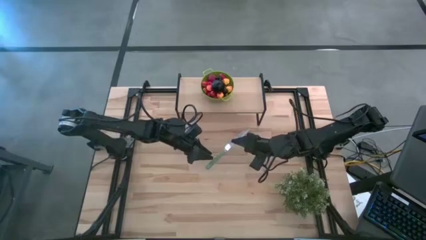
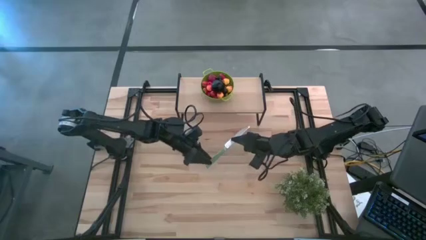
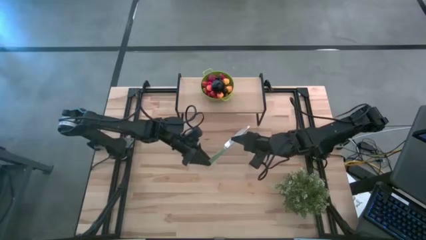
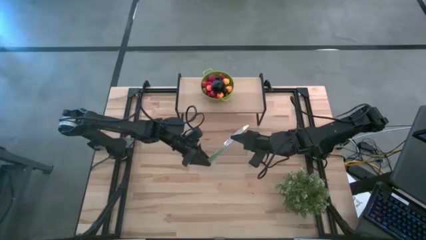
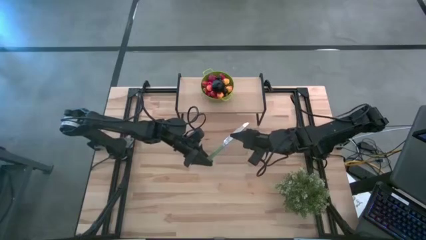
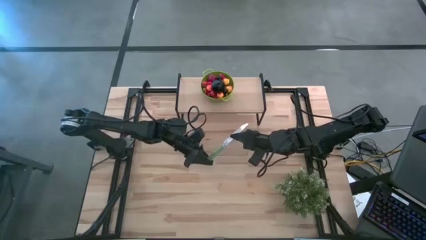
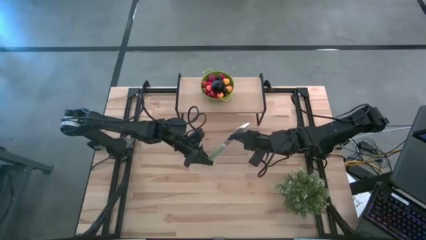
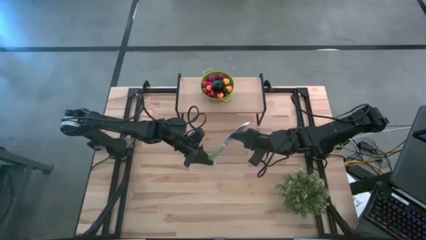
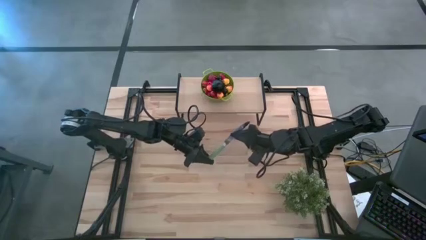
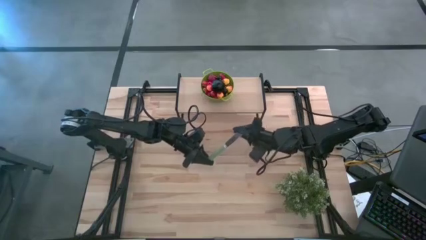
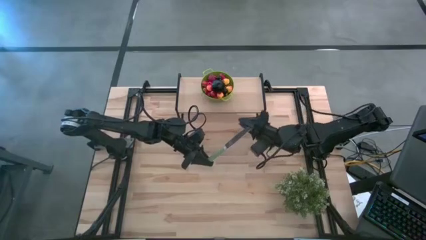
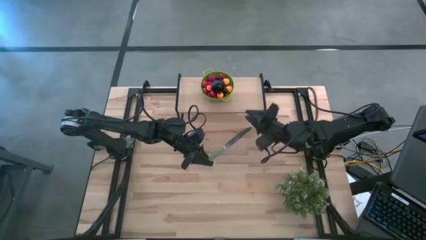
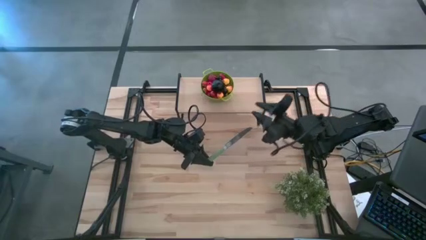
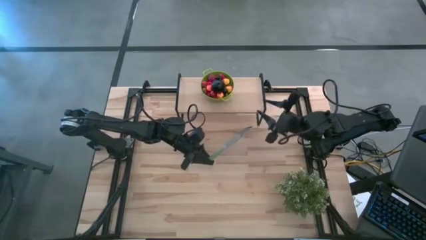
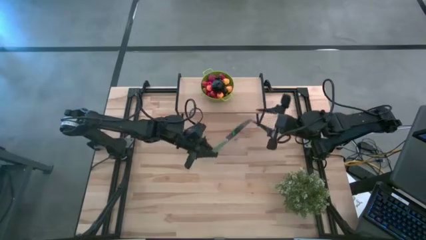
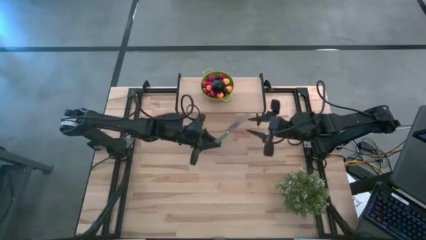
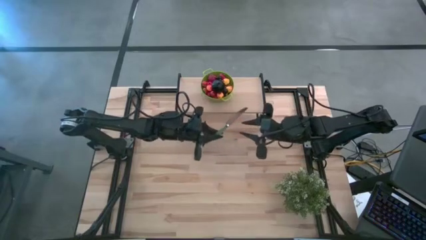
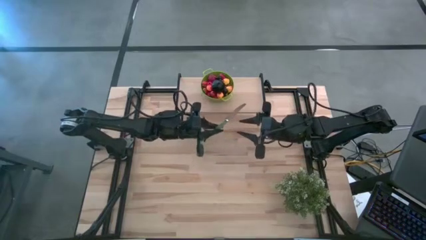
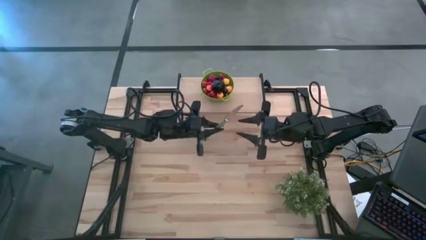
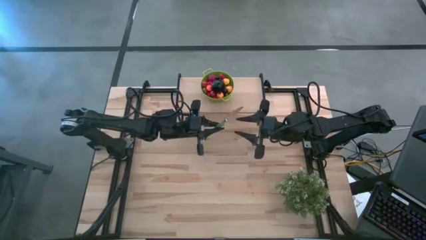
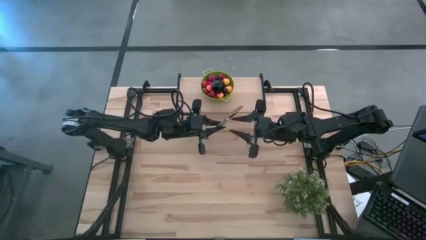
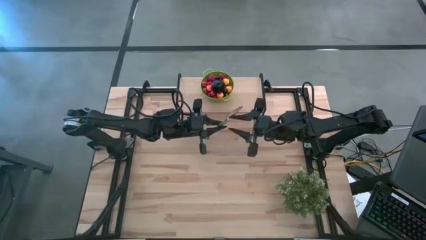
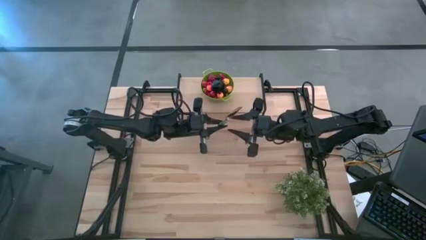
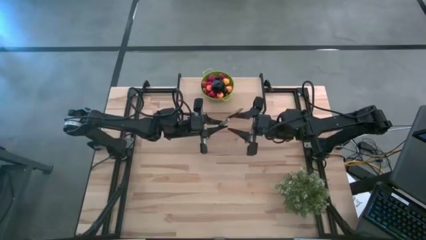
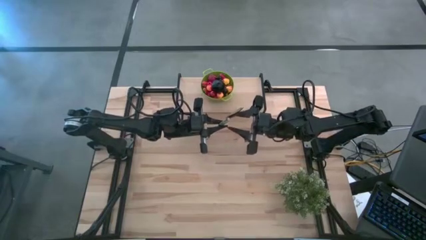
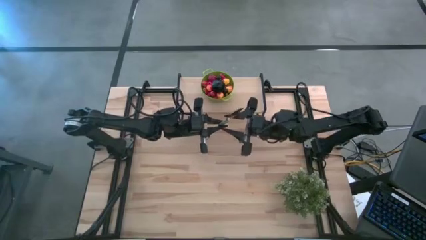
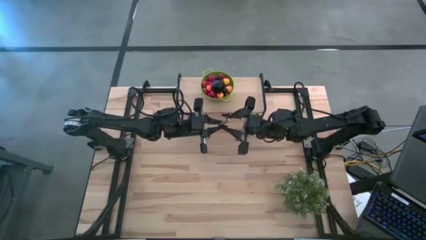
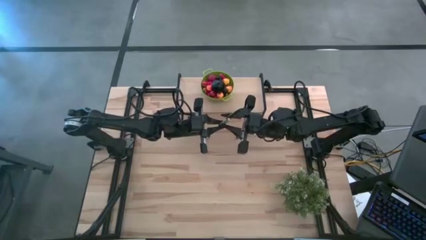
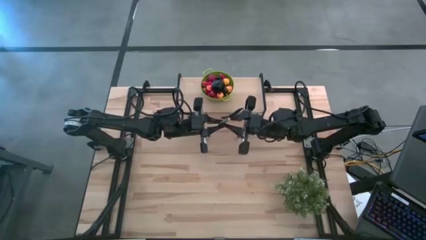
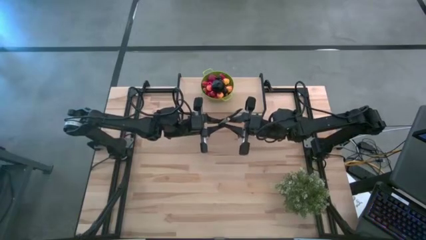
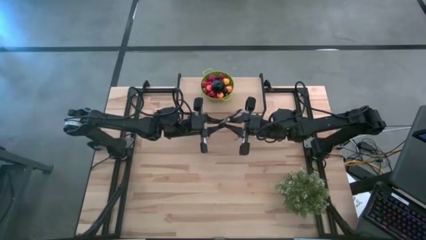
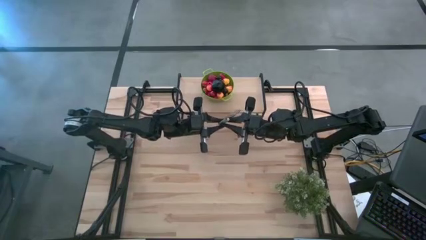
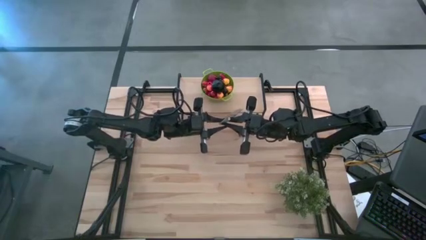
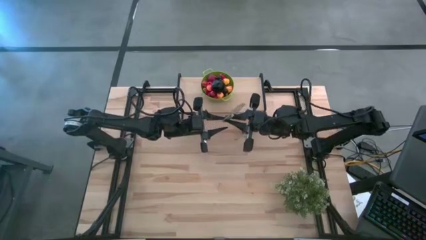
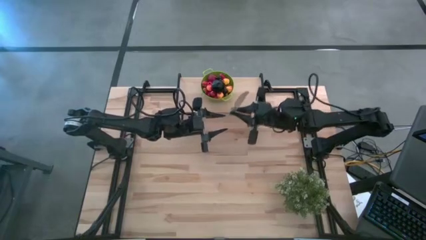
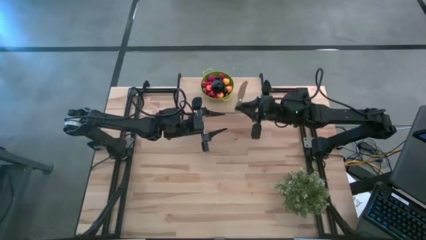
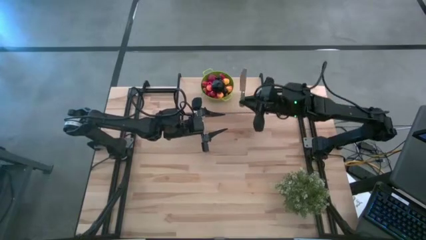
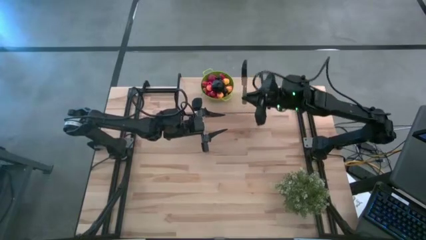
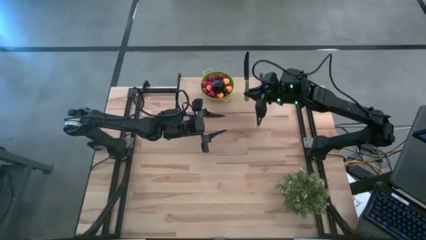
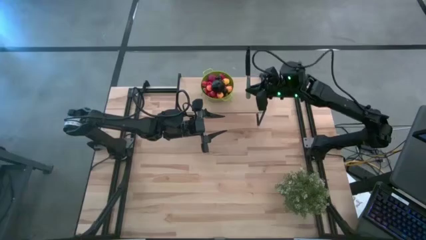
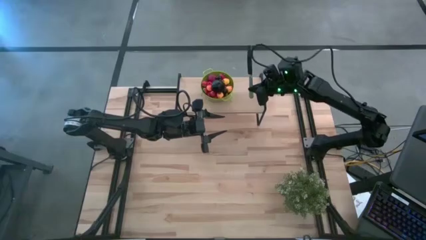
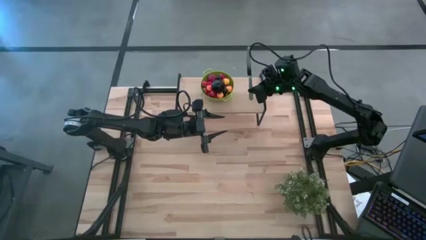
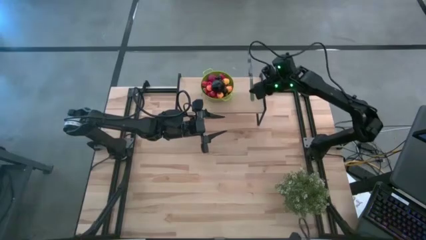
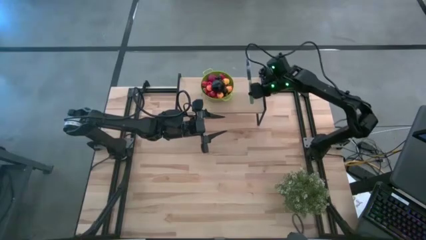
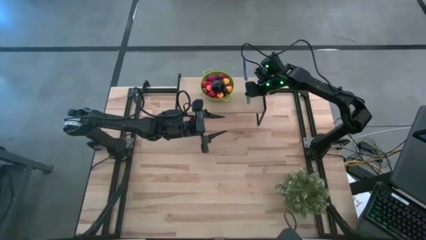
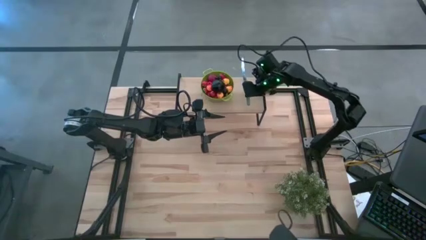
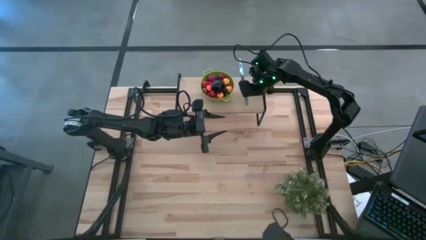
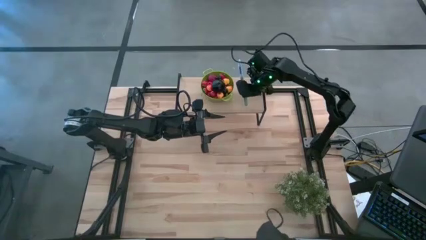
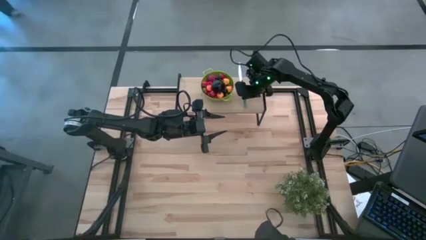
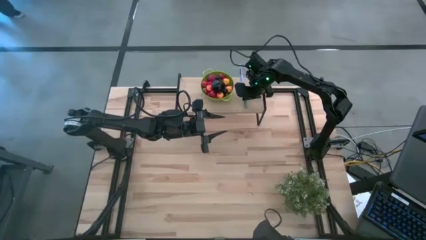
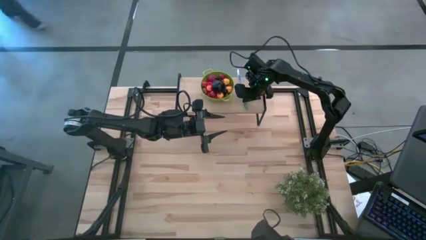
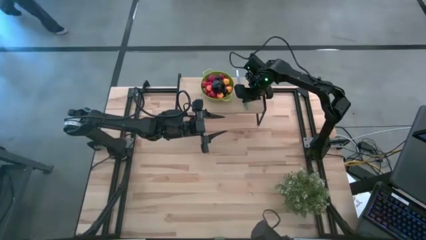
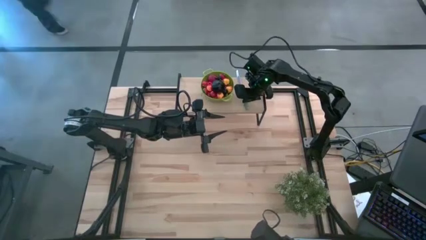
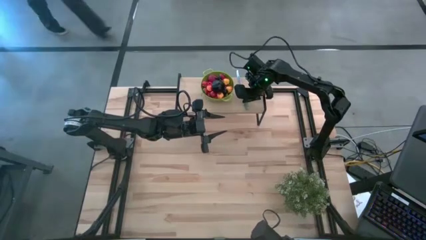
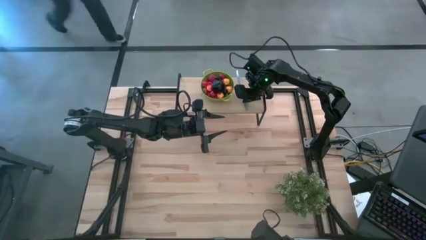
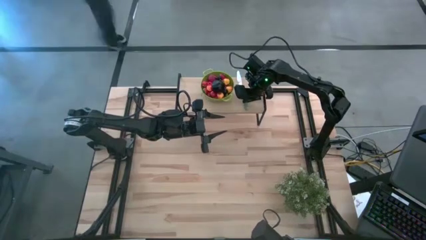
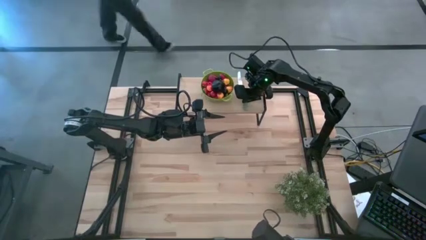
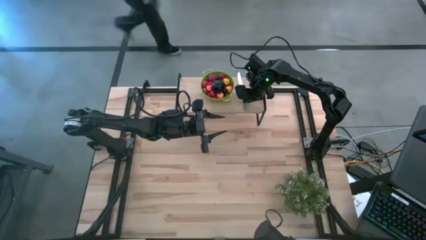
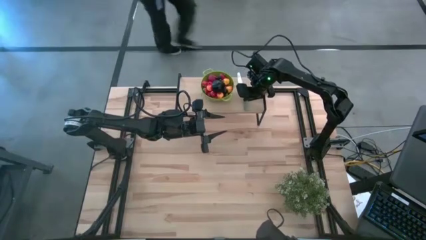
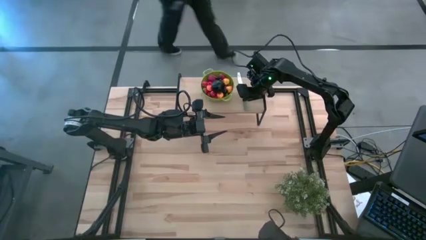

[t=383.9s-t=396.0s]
Task: Pick & Place Fruit
Put the green knife on the shelf to the left of the green colander
